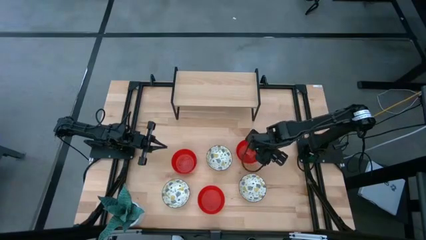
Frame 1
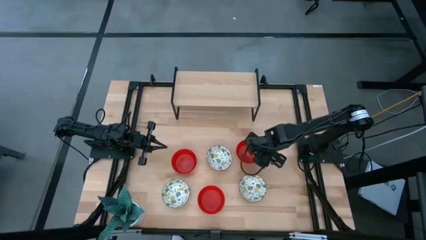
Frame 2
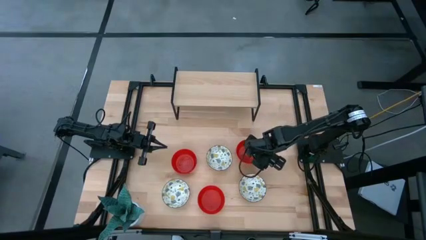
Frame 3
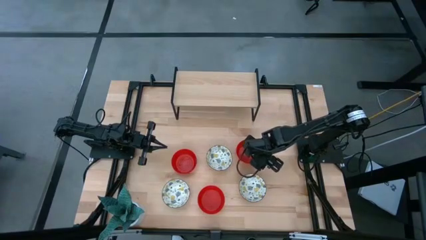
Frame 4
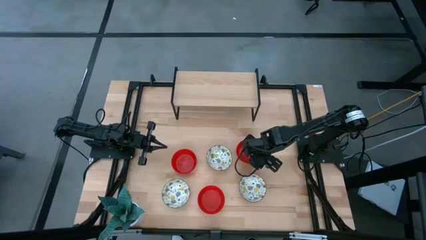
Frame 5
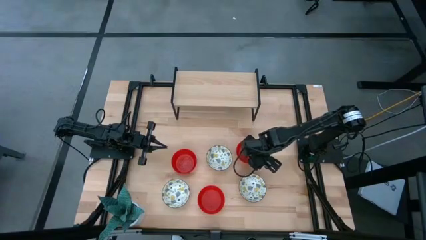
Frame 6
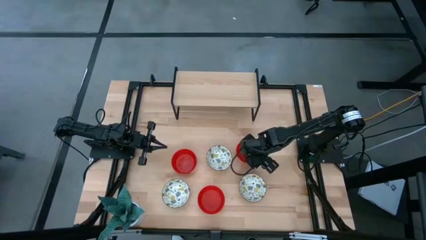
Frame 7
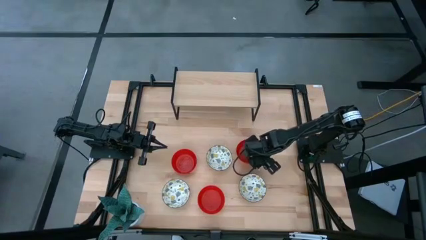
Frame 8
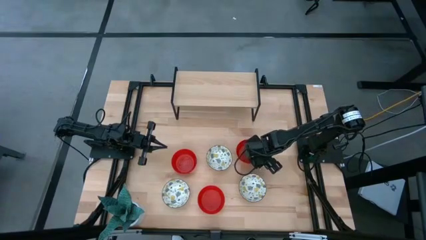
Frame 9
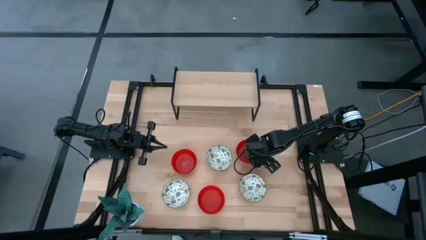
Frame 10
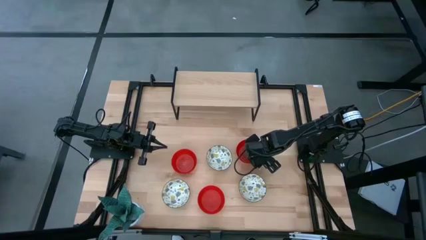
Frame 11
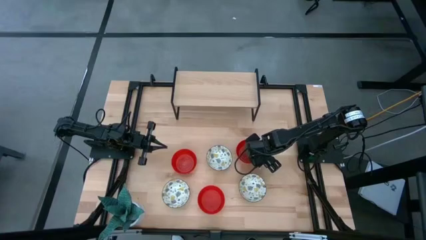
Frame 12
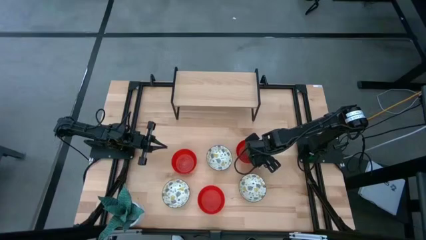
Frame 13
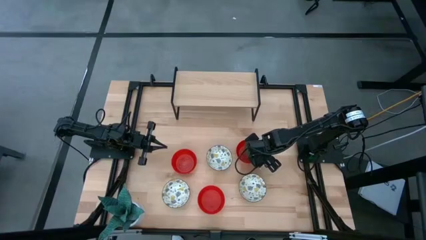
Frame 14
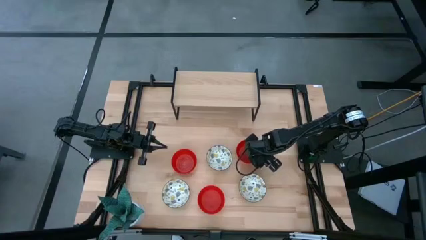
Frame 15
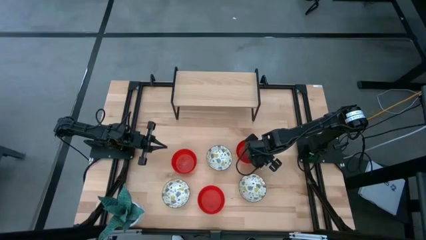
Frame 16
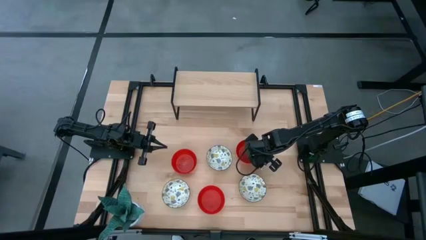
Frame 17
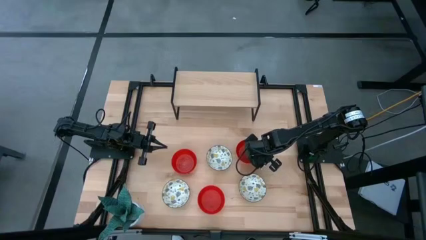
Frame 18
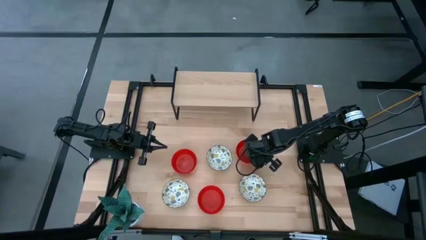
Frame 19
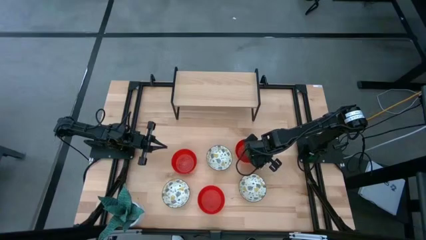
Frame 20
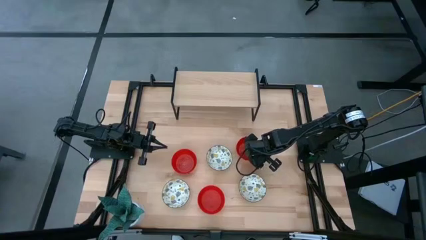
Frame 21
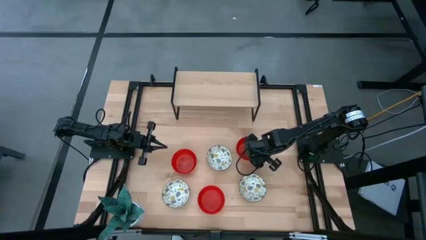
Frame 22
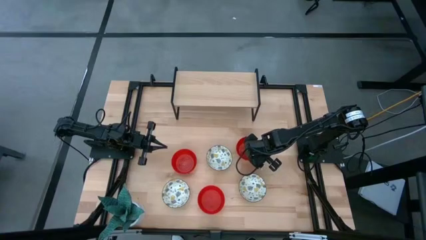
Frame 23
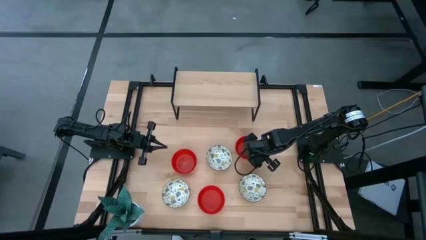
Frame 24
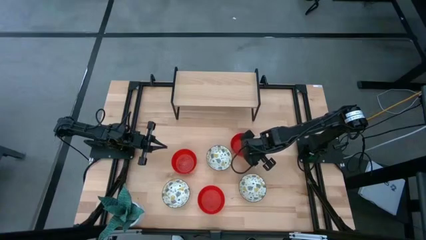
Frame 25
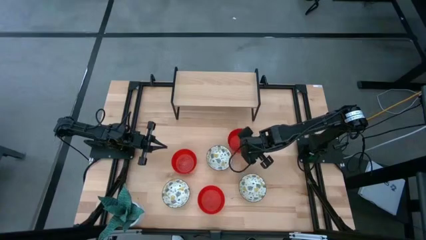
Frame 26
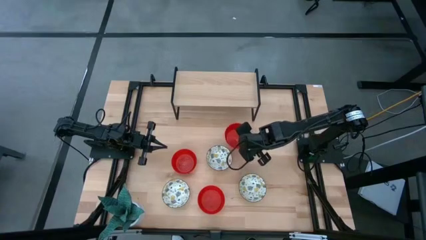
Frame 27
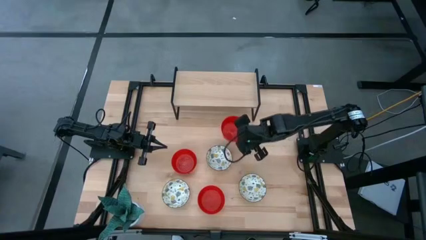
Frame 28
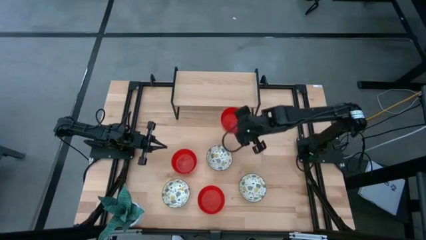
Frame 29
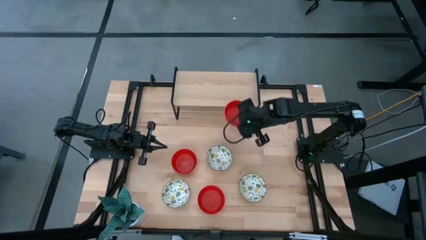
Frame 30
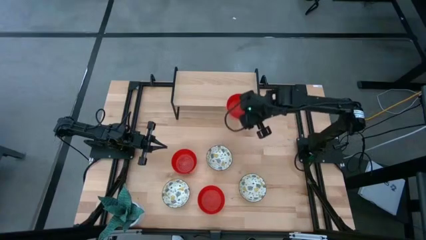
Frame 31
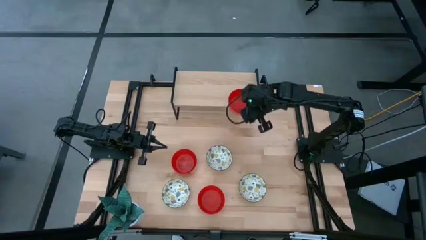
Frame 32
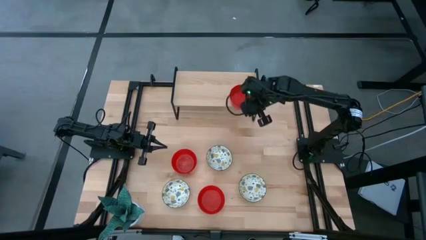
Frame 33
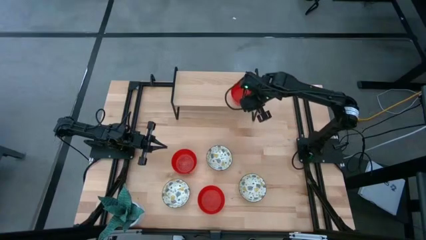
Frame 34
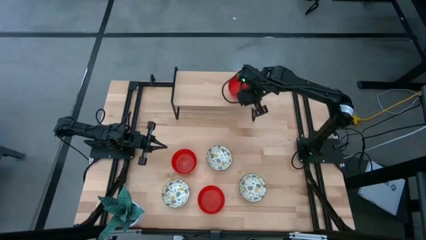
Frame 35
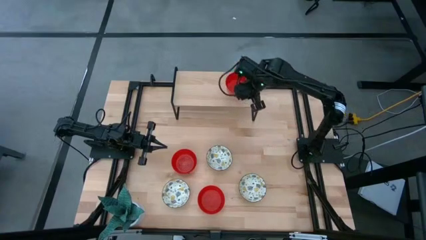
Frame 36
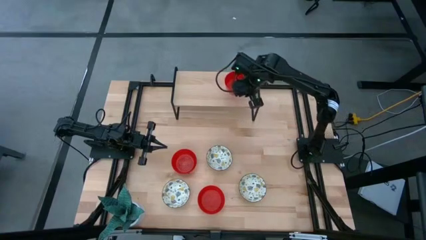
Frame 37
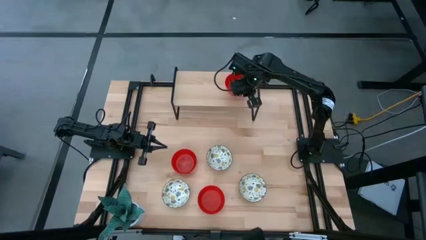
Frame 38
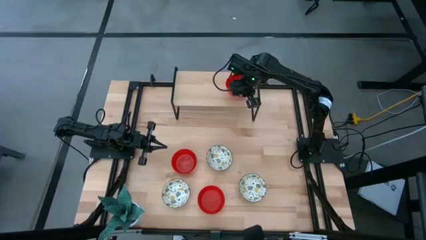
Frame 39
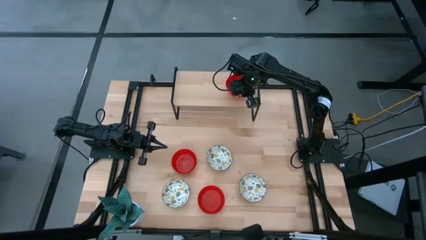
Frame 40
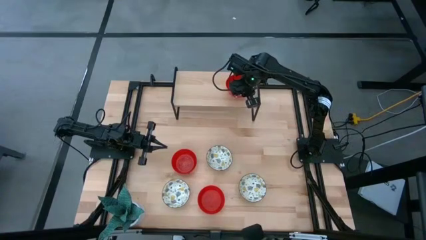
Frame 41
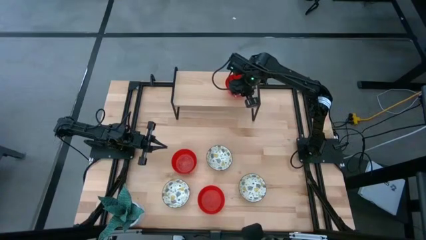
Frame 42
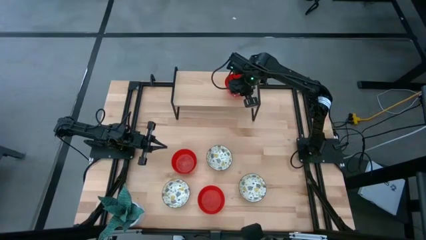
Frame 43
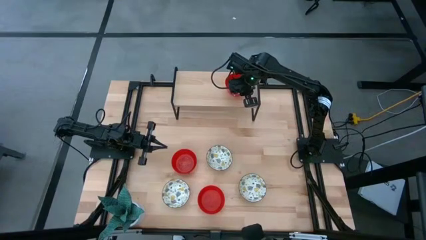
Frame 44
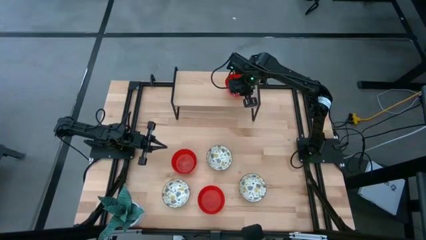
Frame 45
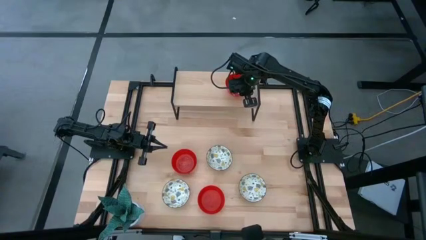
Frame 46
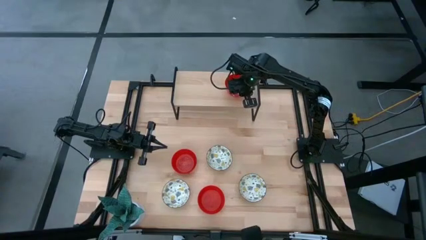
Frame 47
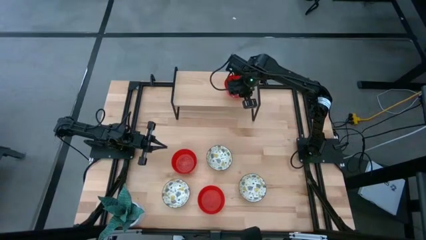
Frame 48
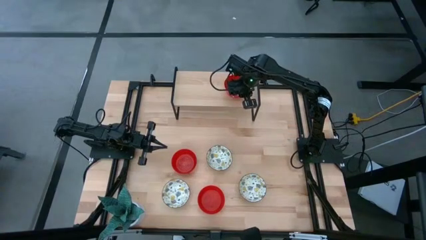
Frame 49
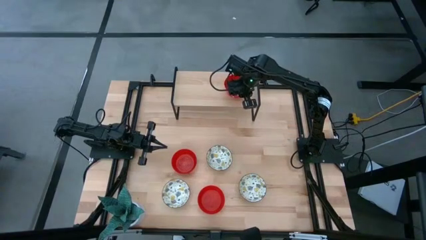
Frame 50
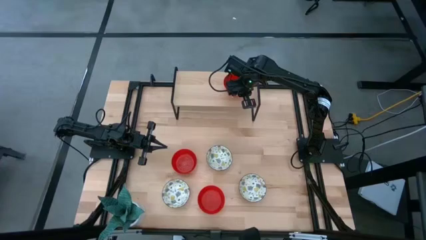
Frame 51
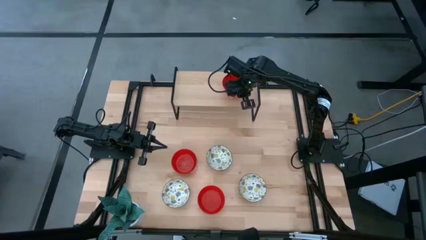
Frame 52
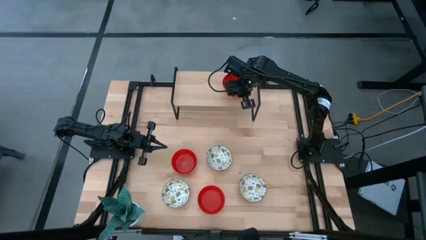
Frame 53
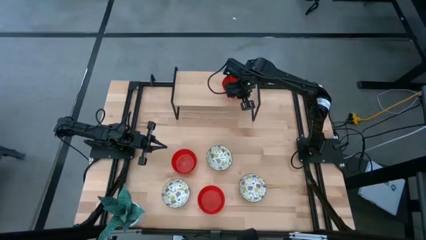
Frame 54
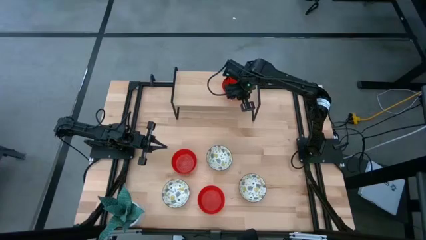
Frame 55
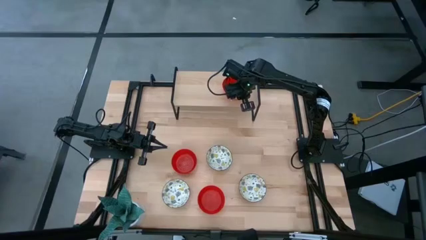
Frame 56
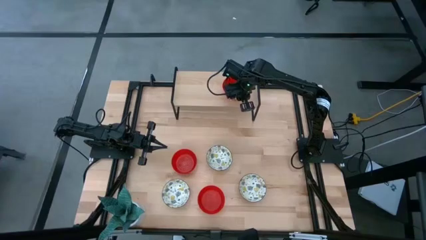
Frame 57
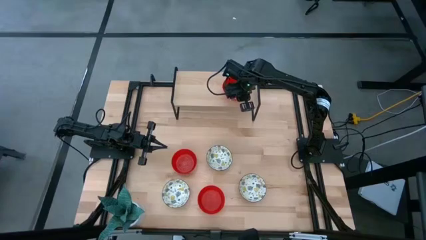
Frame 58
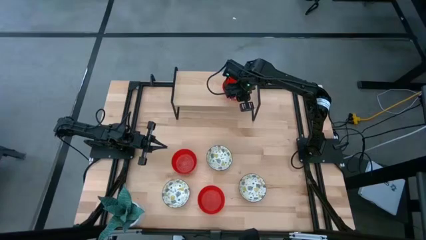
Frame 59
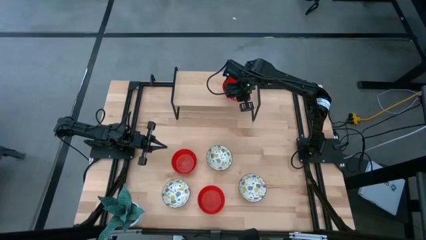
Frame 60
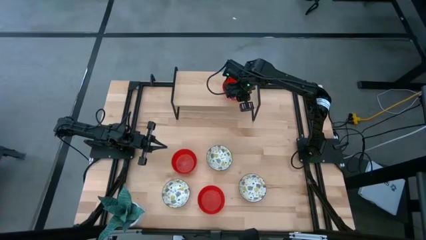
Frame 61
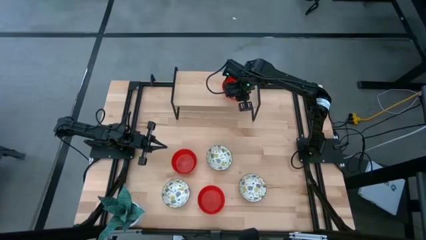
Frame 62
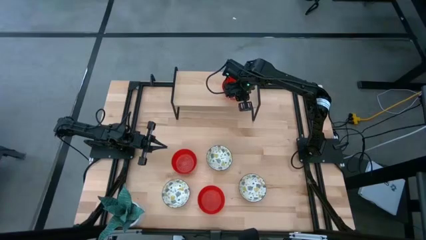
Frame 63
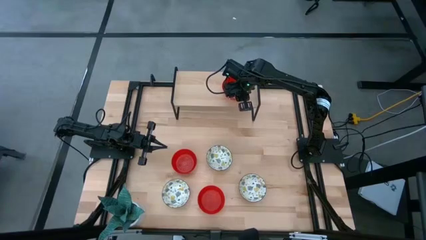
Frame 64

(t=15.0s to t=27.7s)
Task: Pick & Place Mini bowls
Put the right red bowl on the shelf
